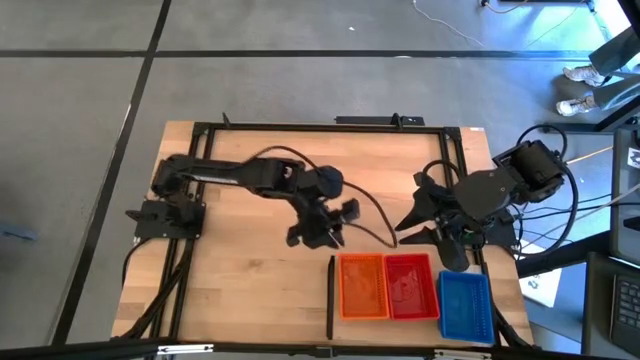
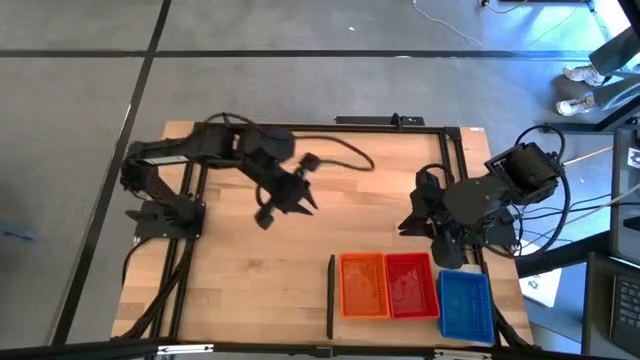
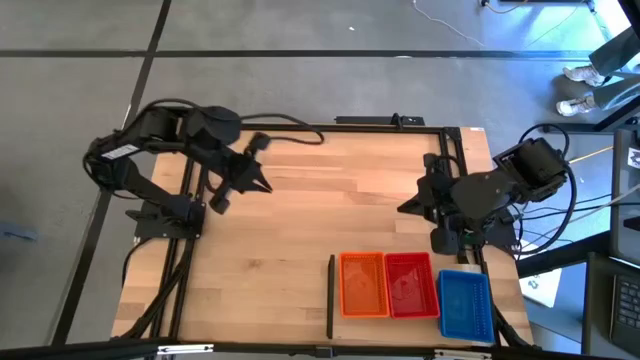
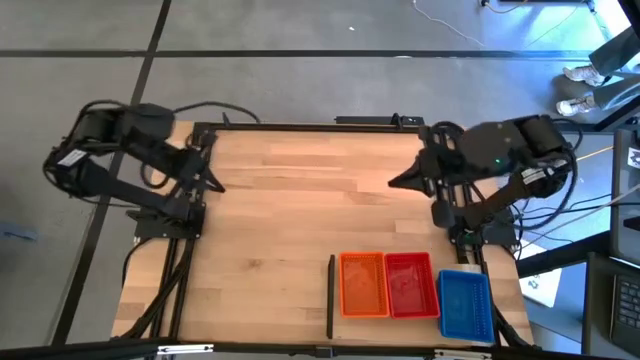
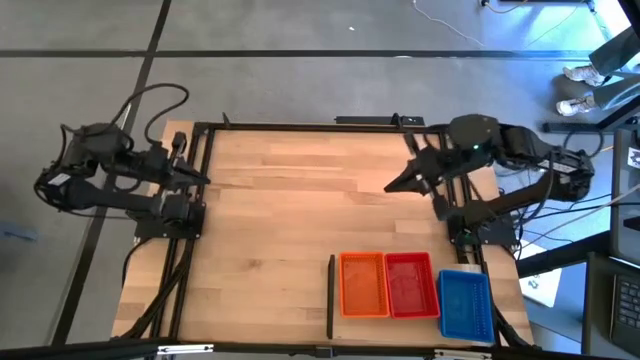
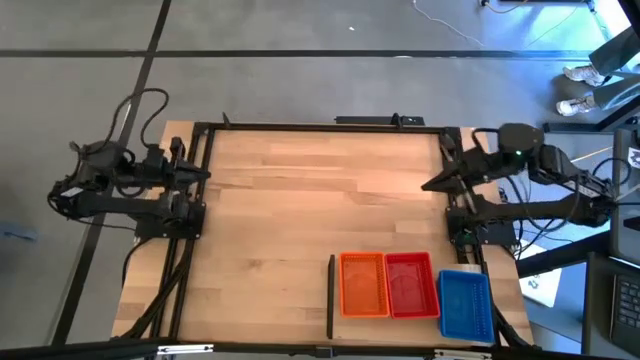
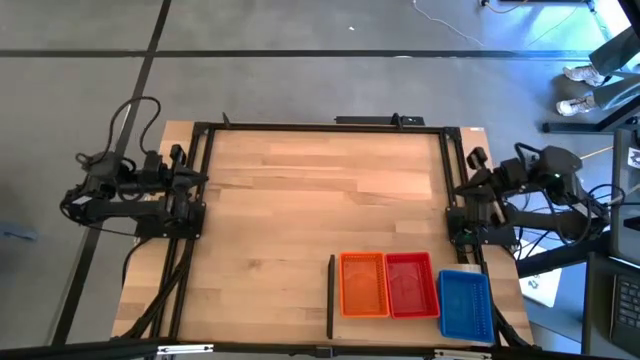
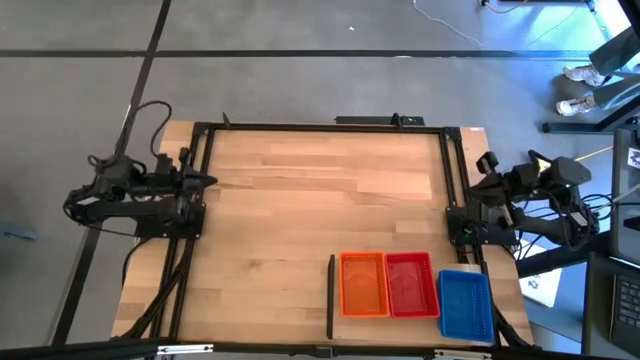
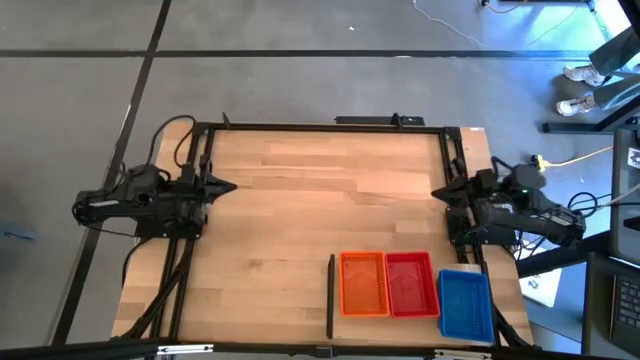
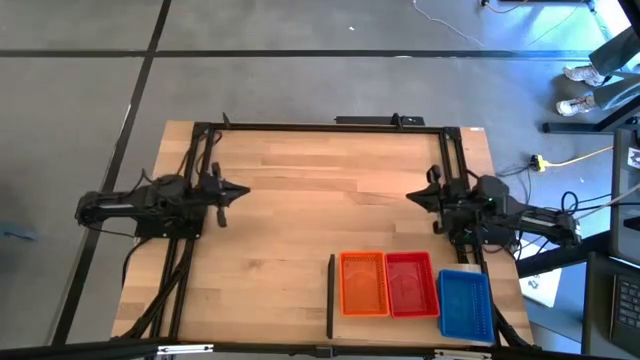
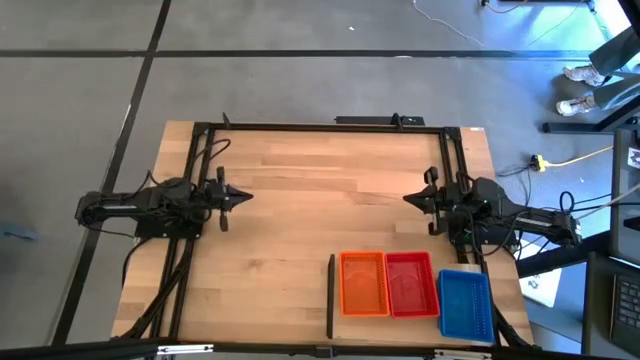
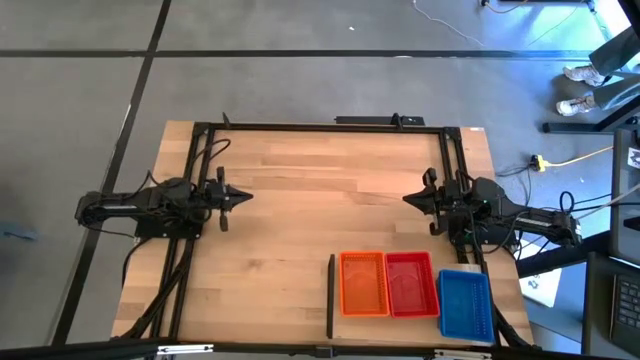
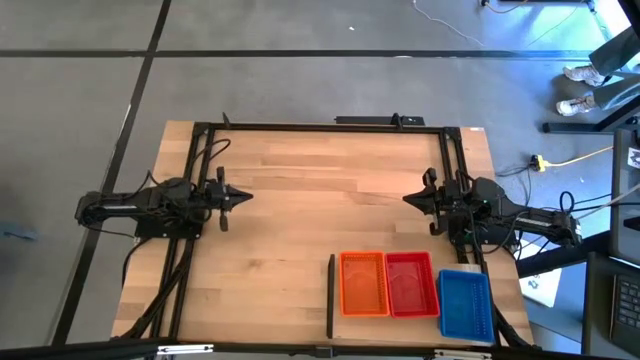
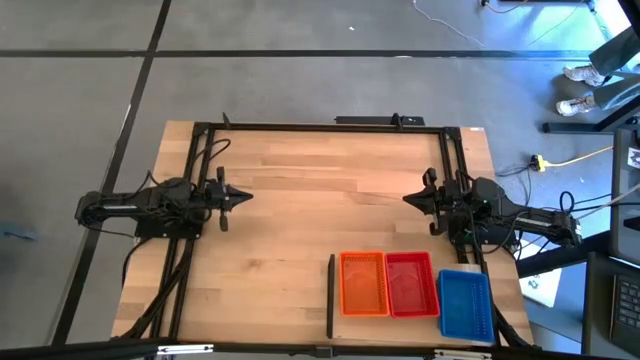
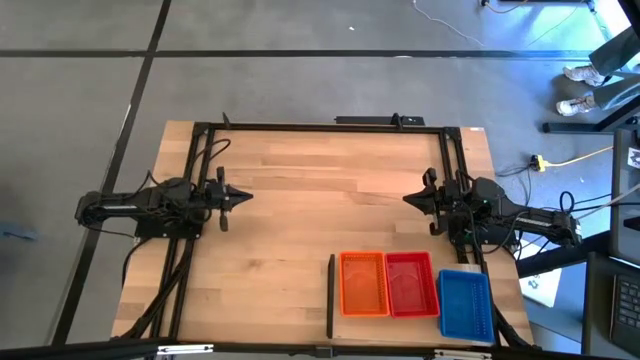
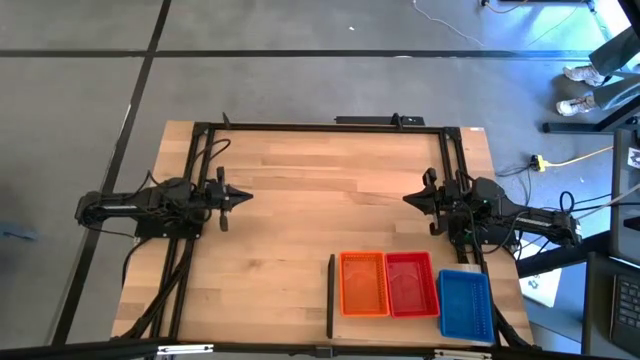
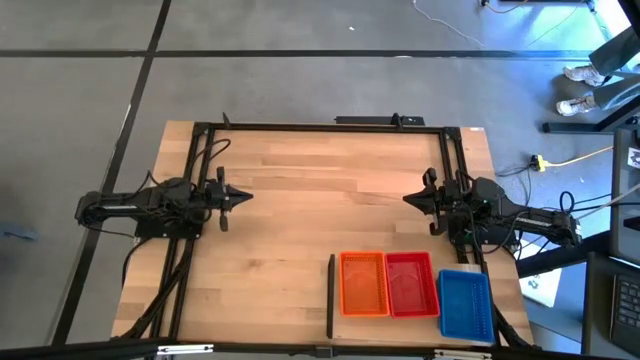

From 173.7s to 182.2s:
Task: Stack baskets on shelf by color
Return to Home Position

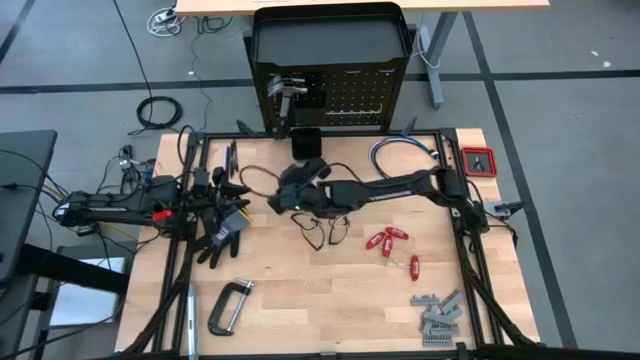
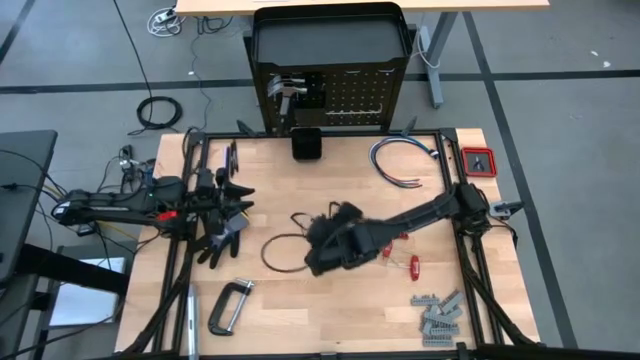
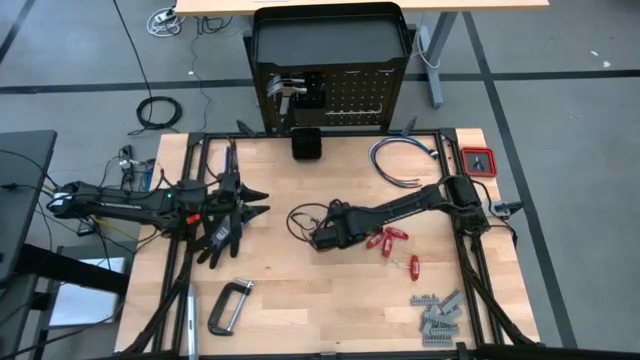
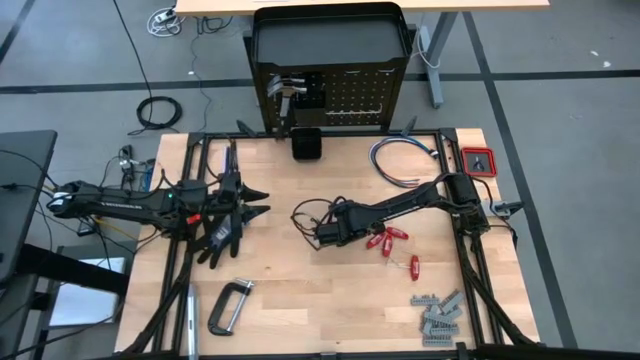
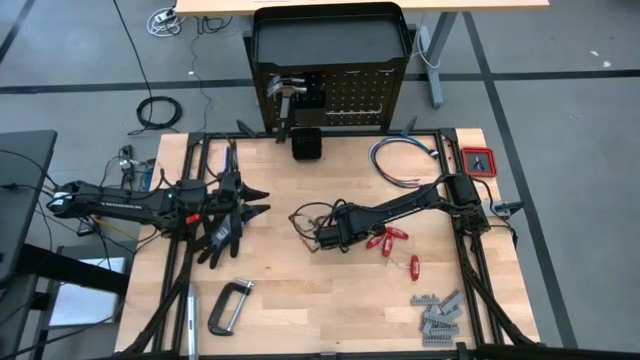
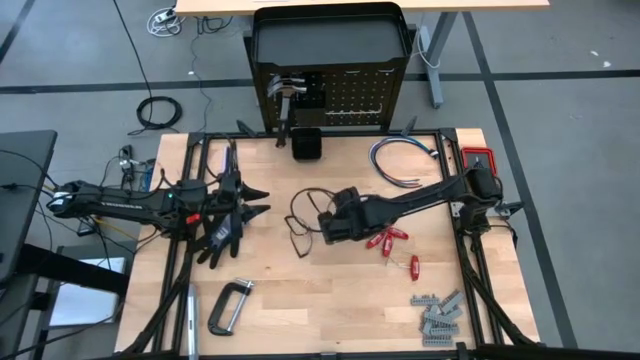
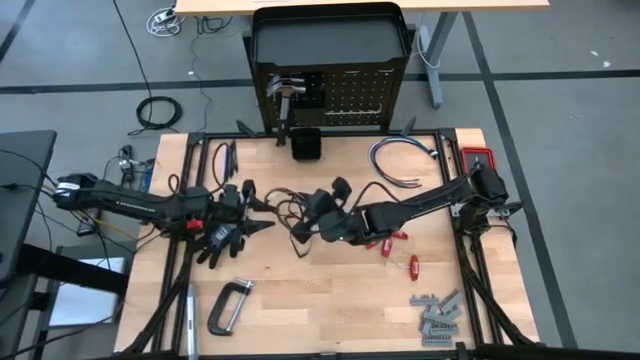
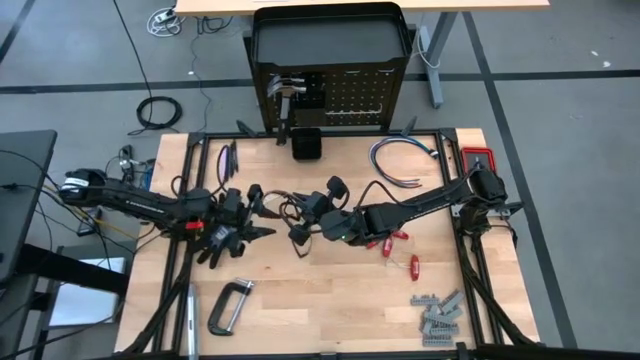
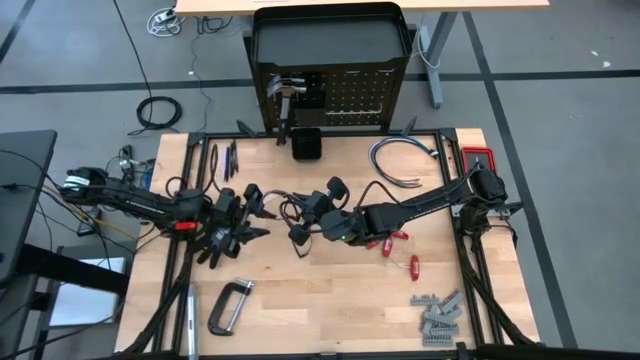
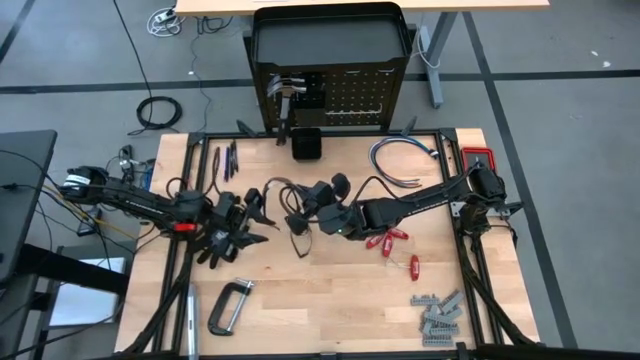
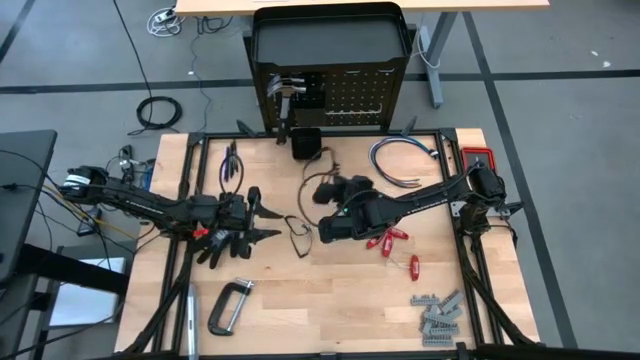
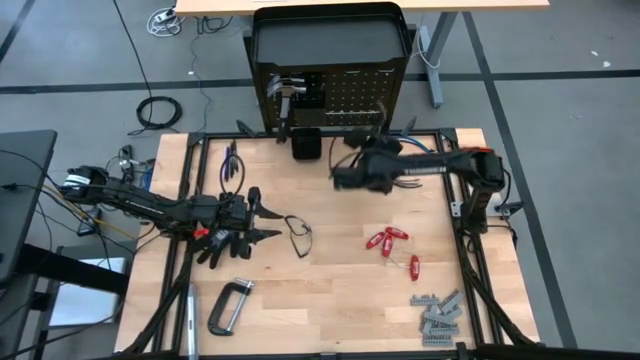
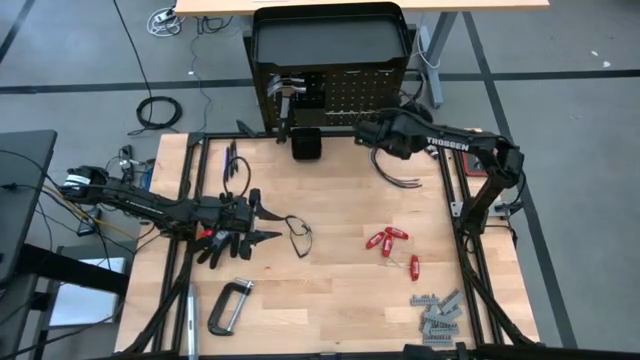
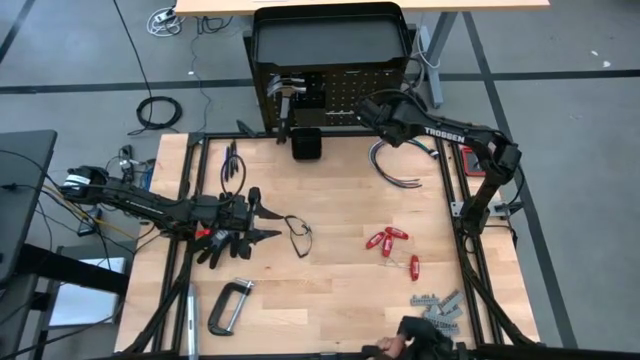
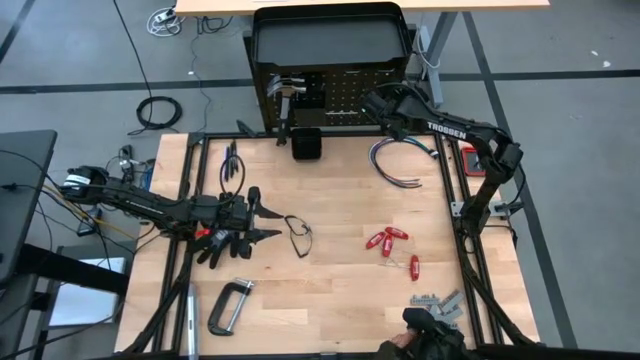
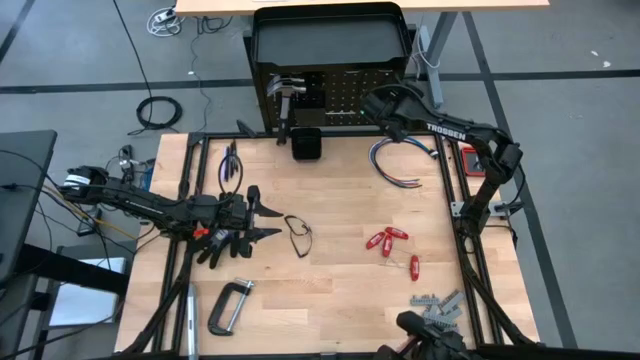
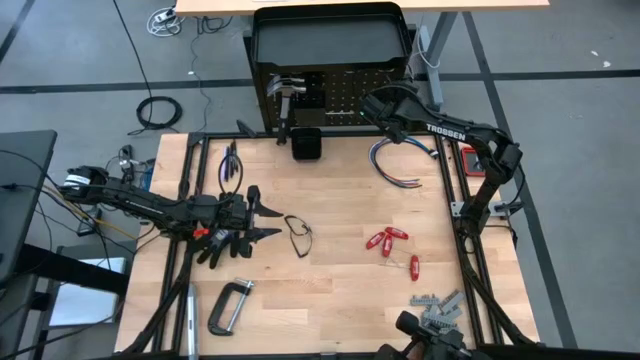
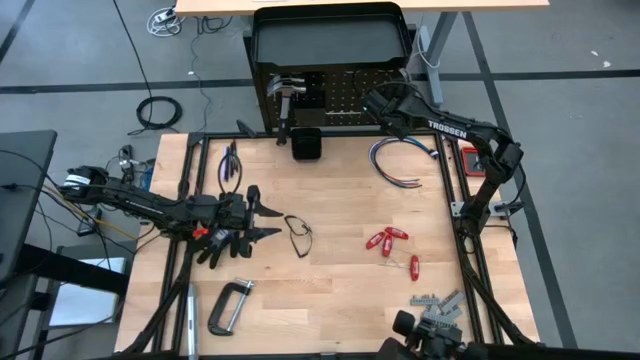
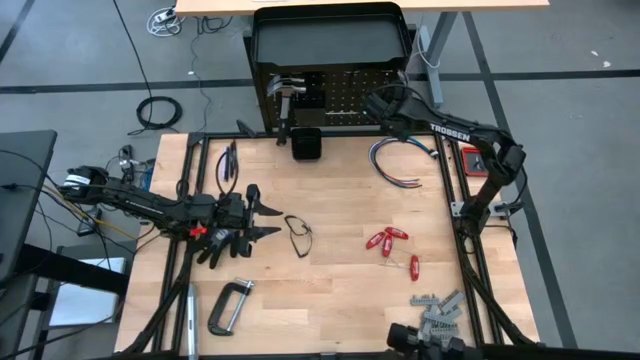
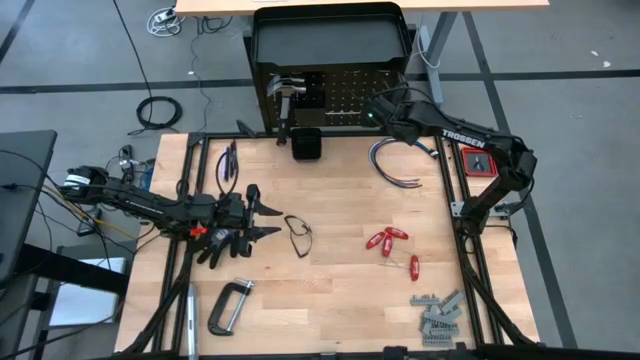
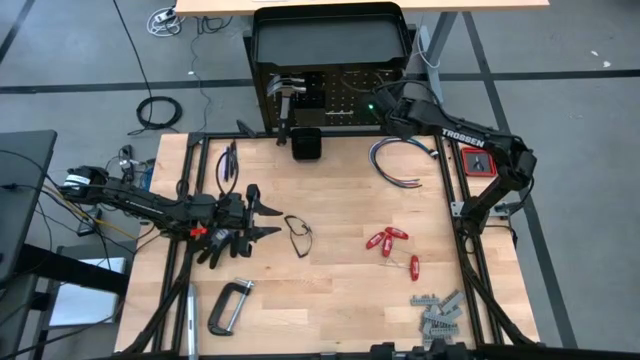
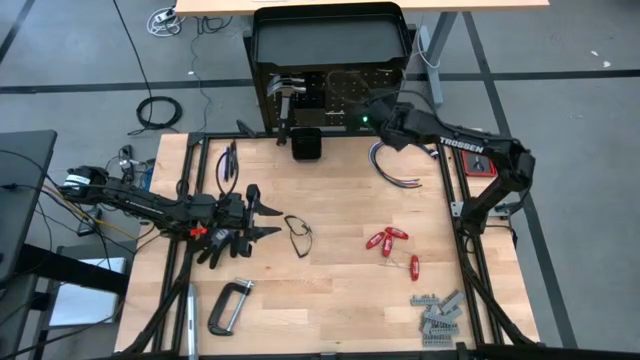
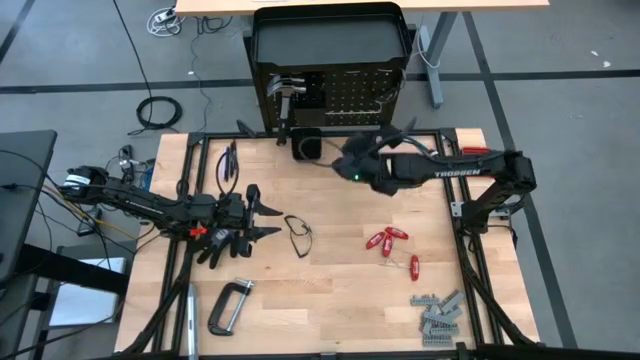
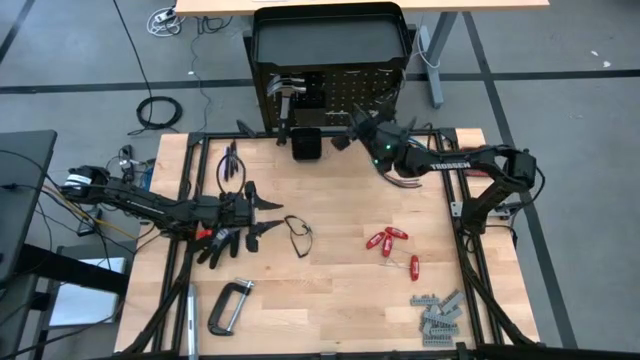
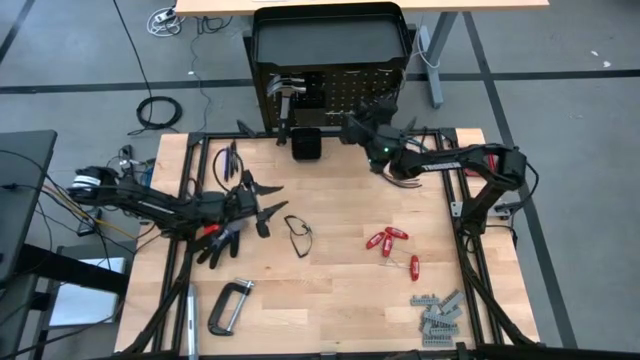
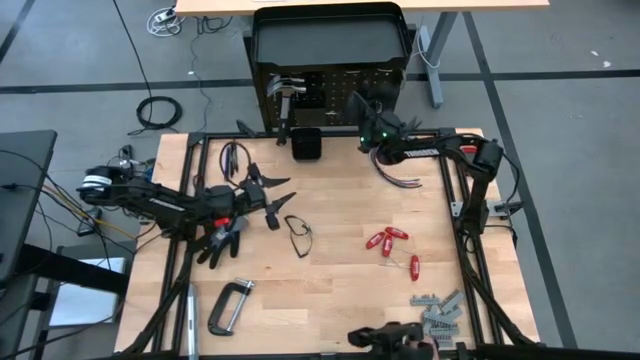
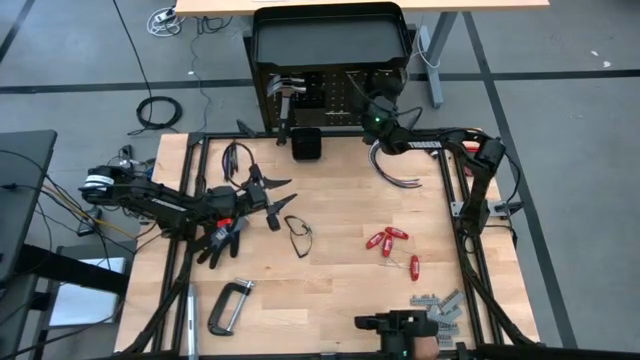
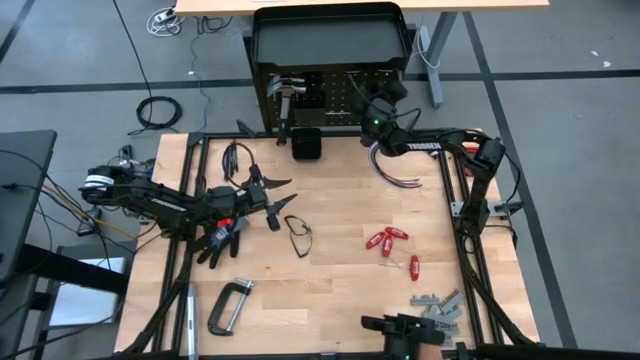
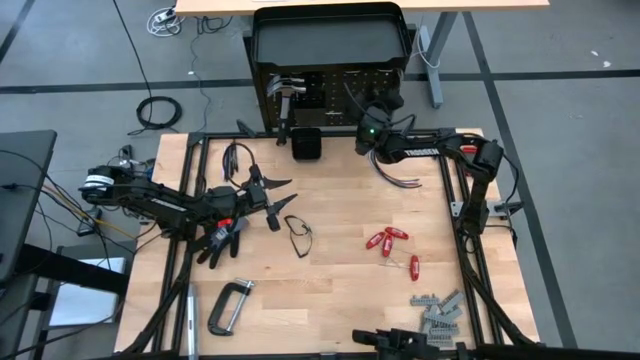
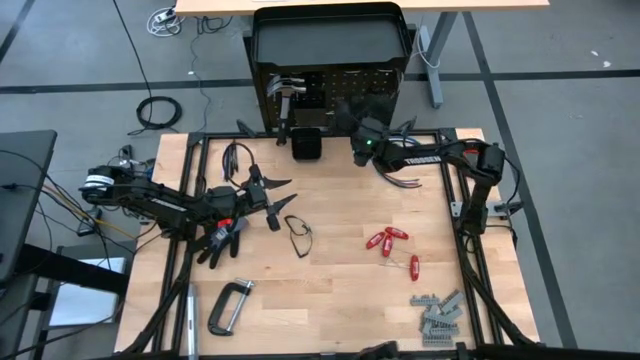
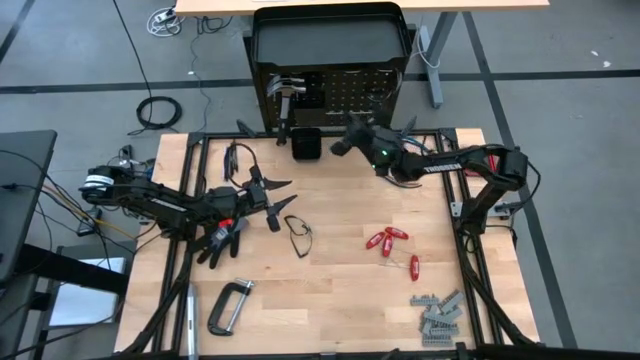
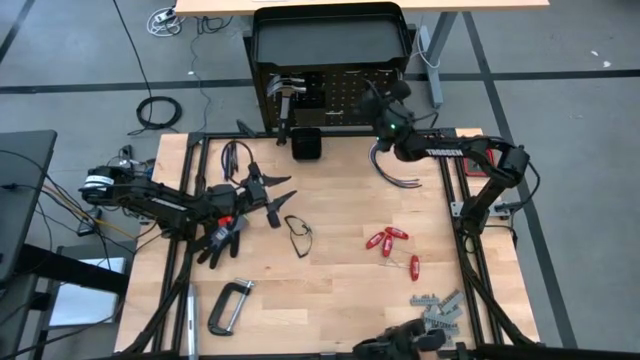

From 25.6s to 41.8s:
Task: Hang tools onto peg board
Hang the safety goggles on the peg board
